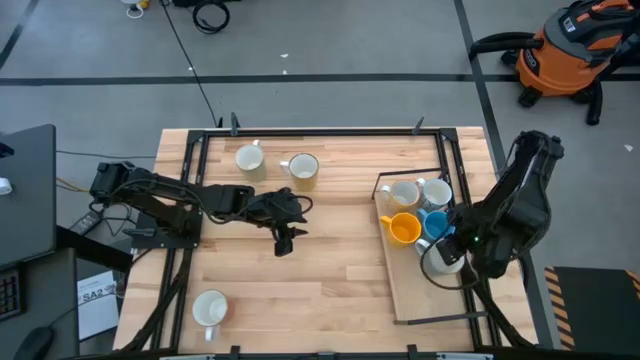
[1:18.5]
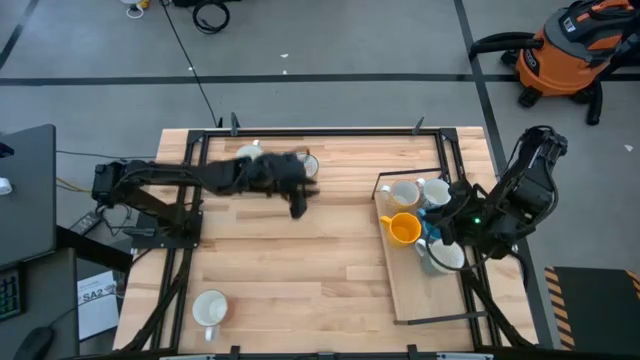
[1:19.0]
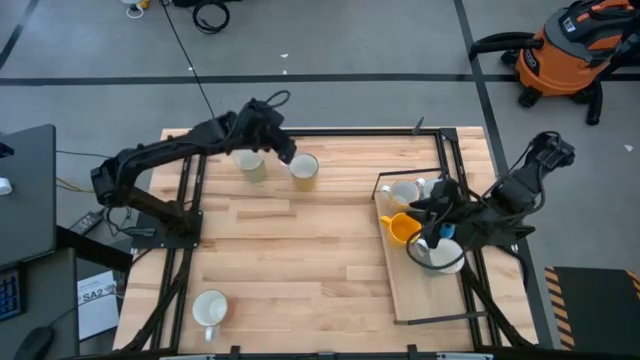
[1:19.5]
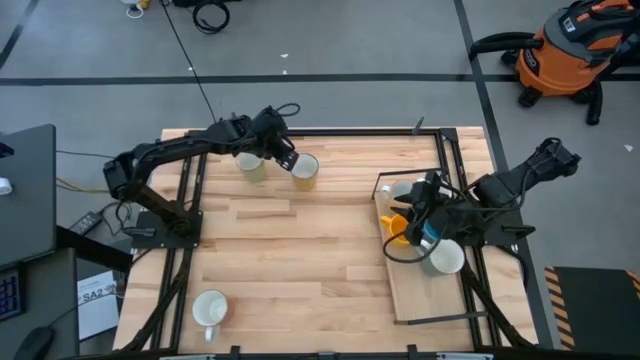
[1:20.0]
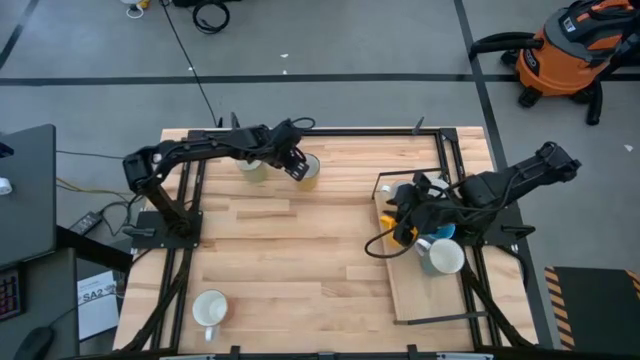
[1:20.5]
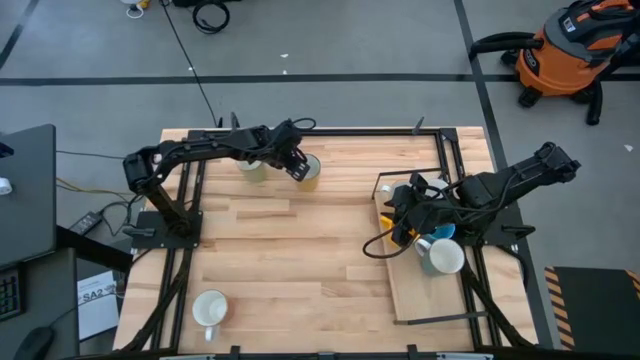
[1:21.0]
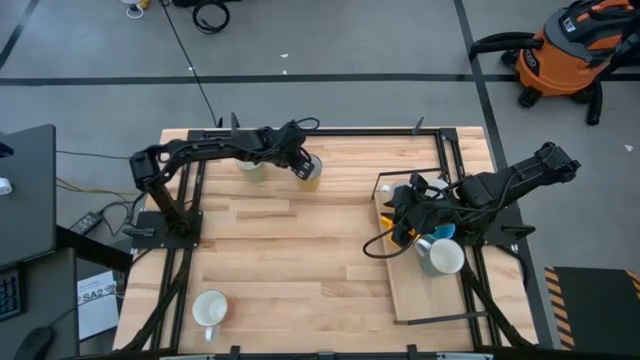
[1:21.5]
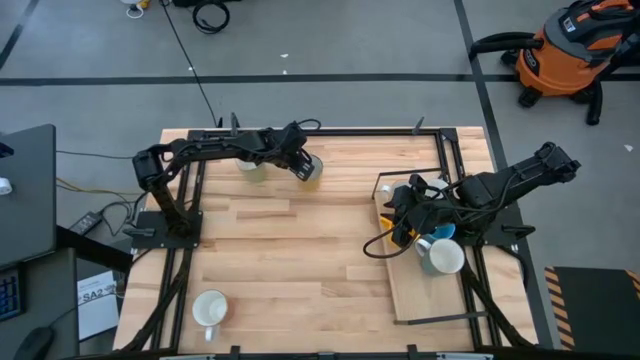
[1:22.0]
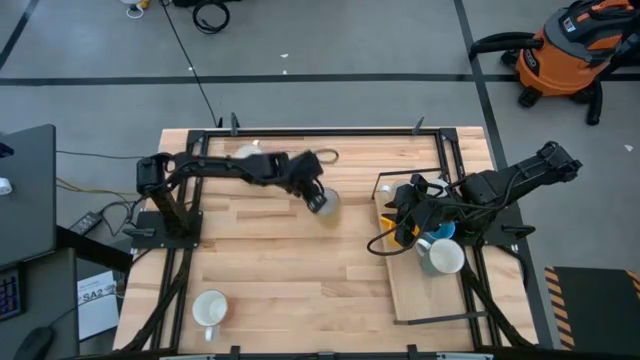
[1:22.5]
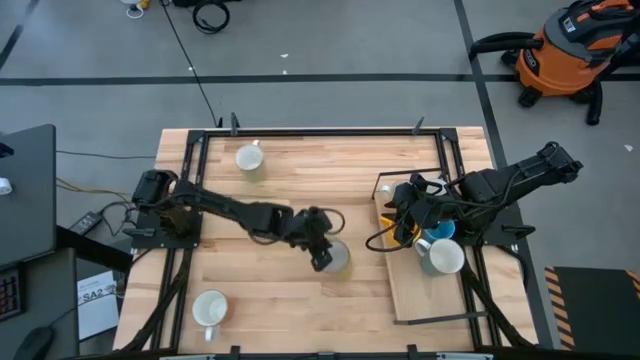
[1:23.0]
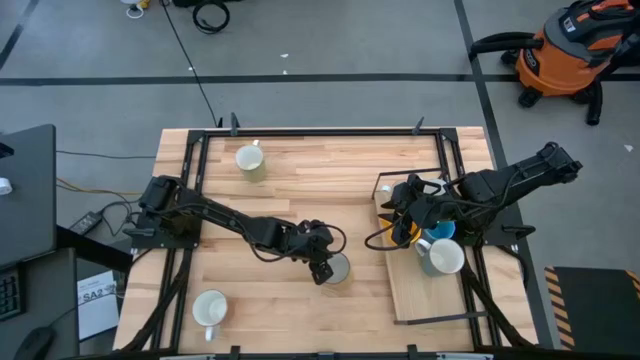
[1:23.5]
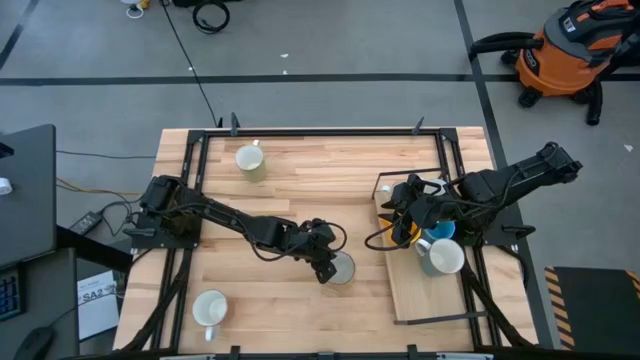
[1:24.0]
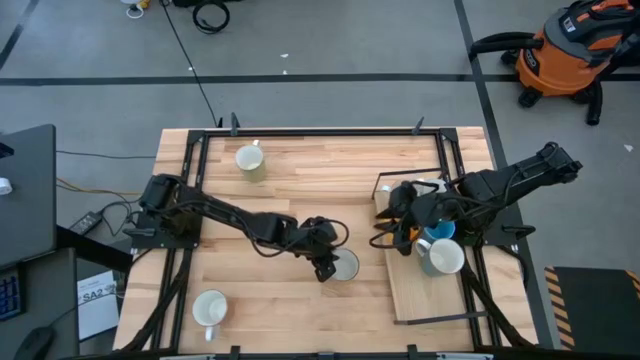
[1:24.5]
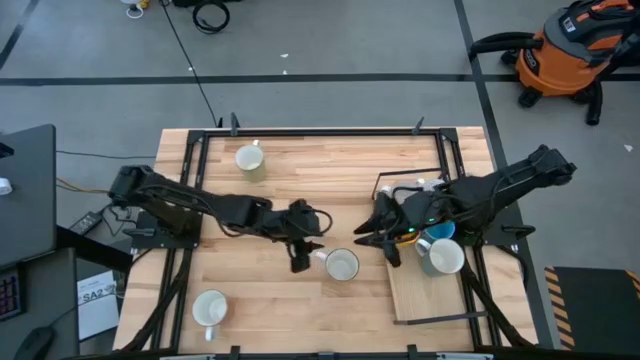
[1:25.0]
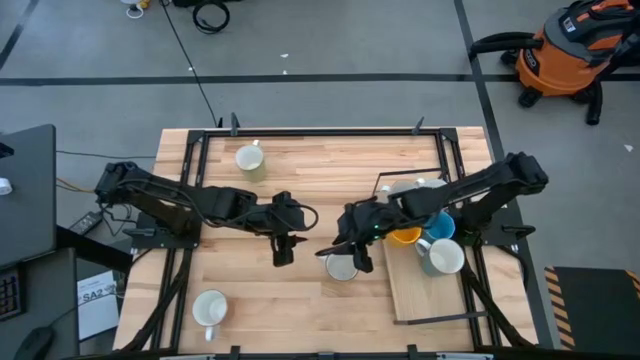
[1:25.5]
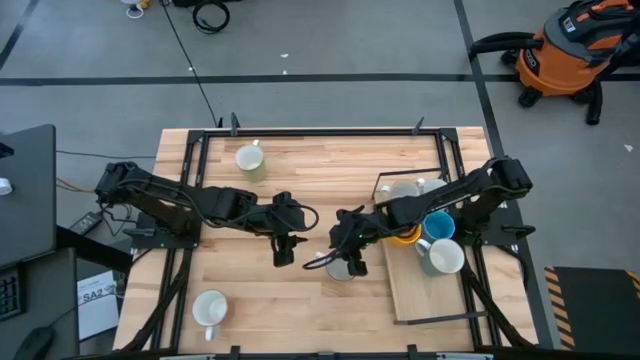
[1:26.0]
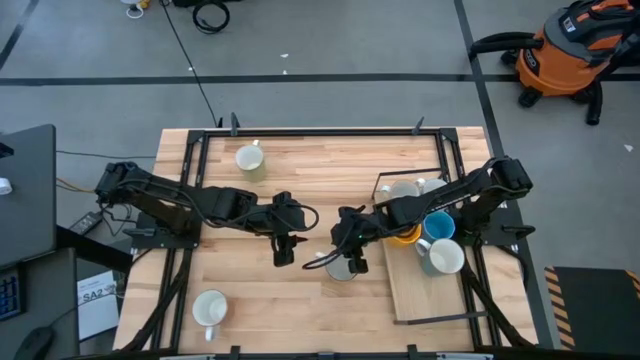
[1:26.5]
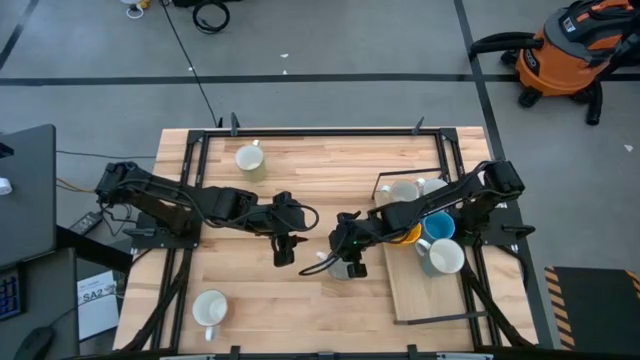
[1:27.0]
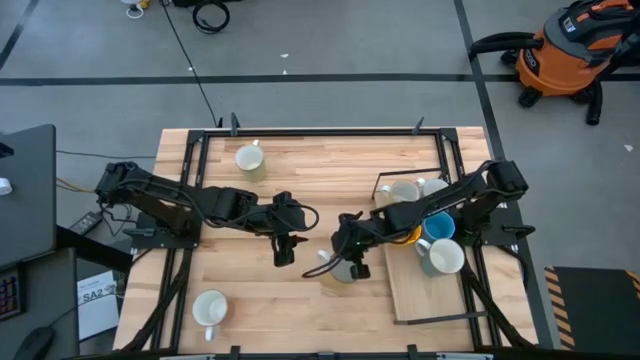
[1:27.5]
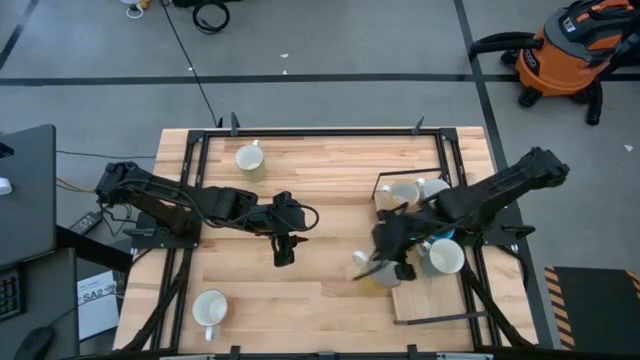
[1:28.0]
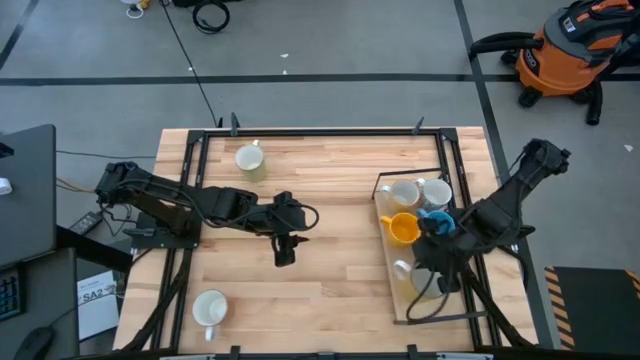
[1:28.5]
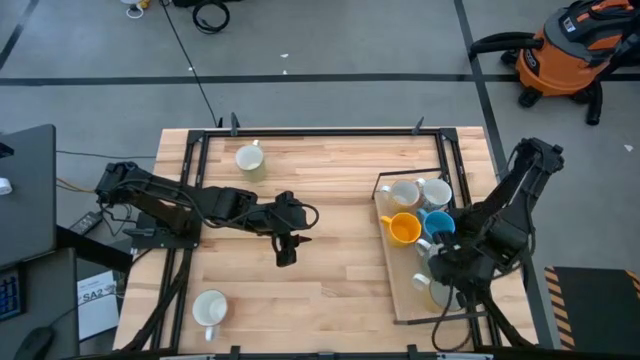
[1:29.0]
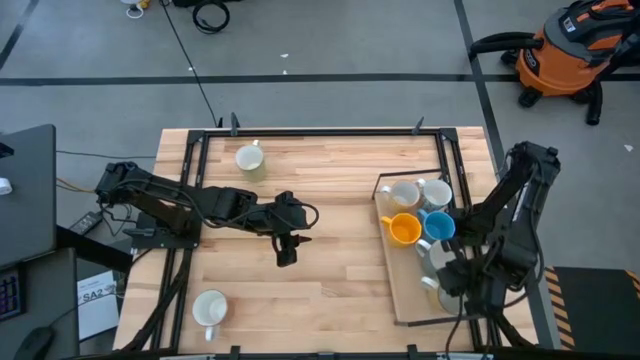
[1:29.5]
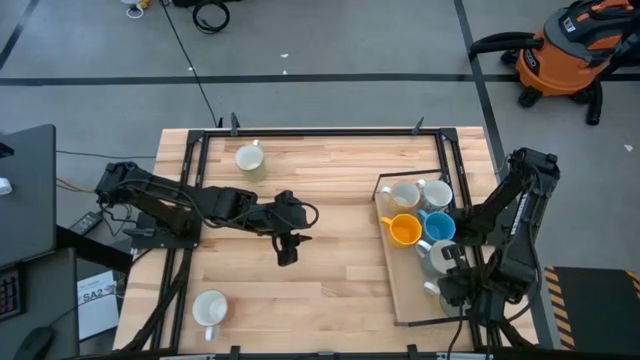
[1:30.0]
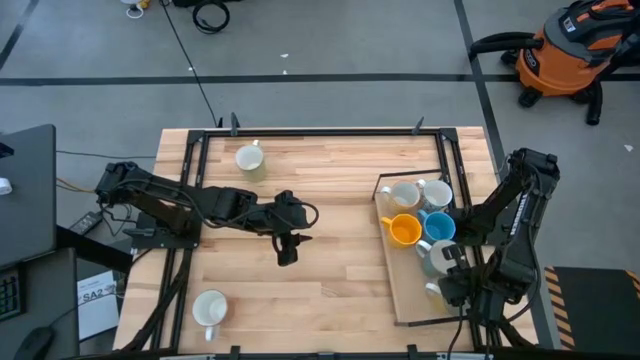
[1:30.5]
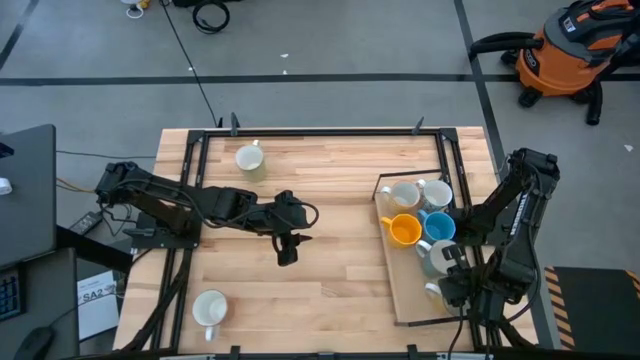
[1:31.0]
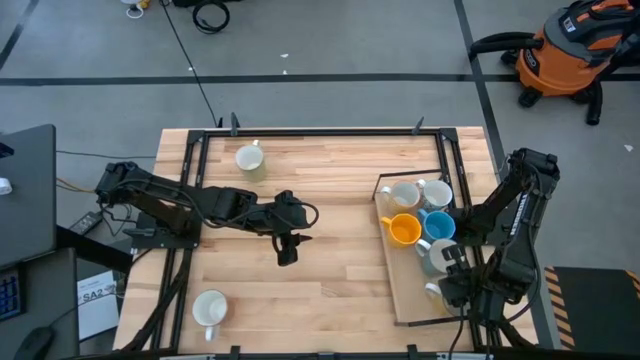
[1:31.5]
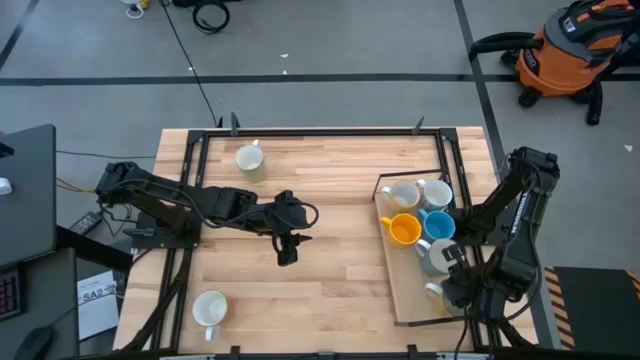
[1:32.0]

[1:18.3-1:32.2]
Task: Place coffee mugs
Put the yellow white mug on the shelf
